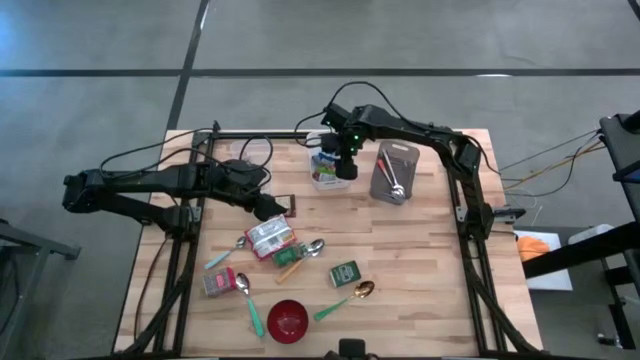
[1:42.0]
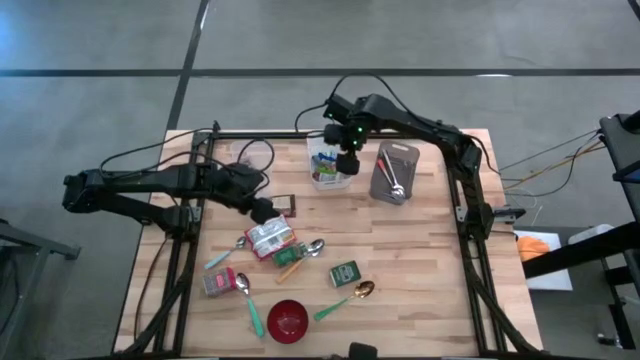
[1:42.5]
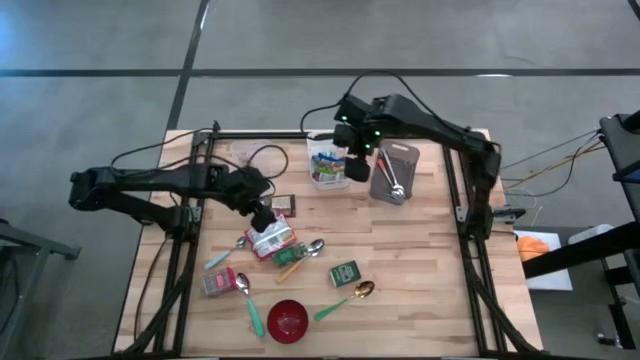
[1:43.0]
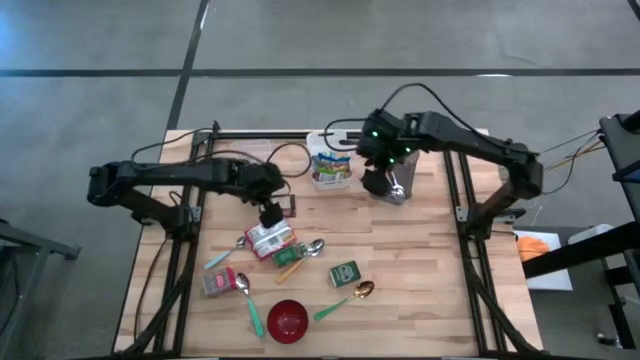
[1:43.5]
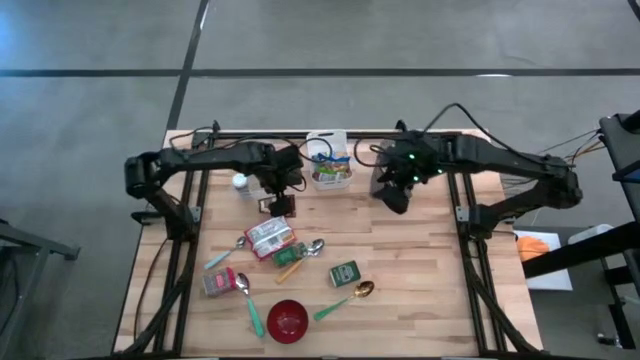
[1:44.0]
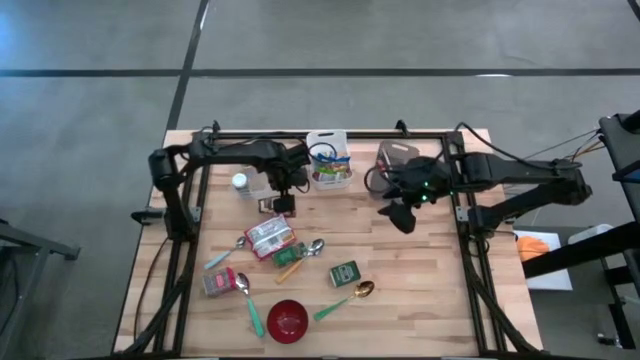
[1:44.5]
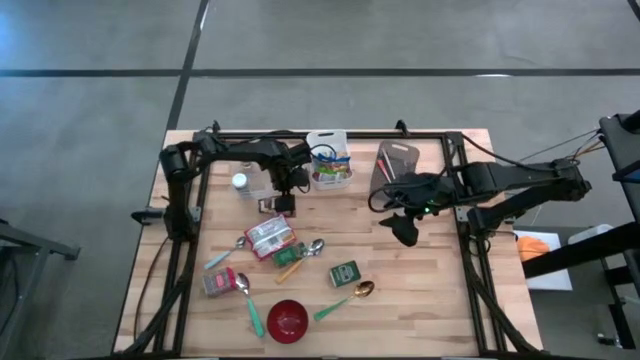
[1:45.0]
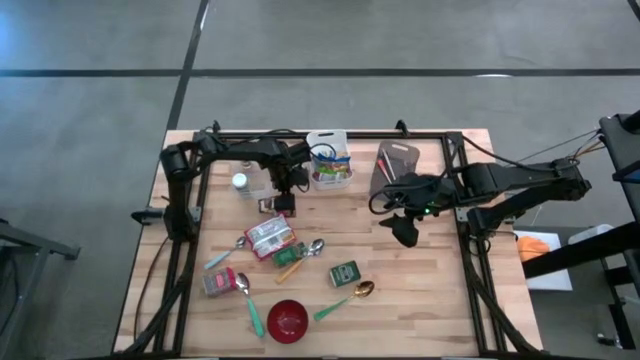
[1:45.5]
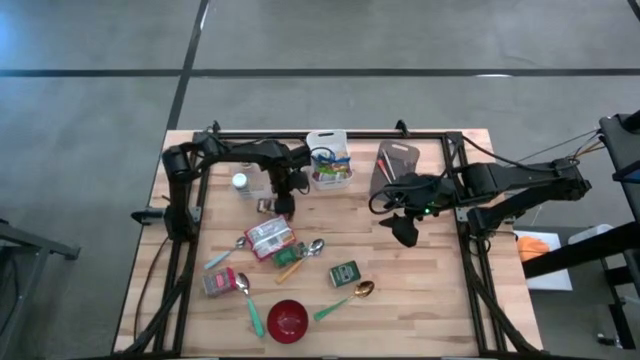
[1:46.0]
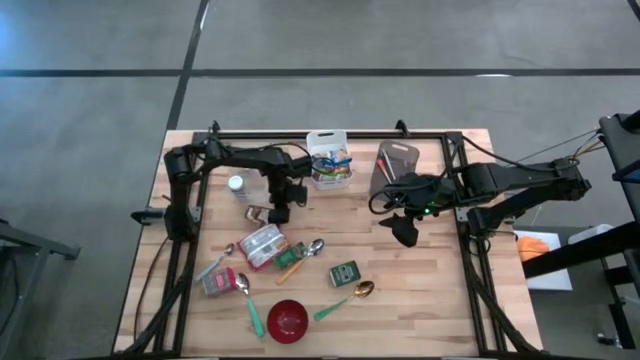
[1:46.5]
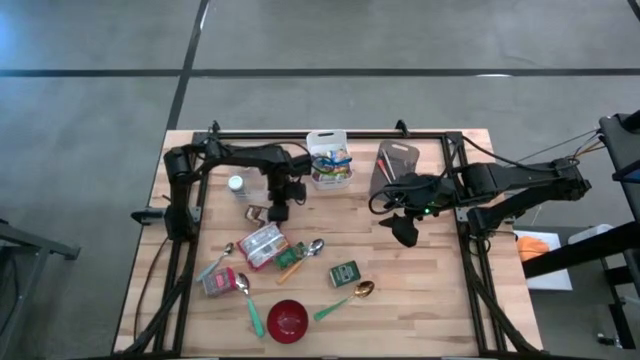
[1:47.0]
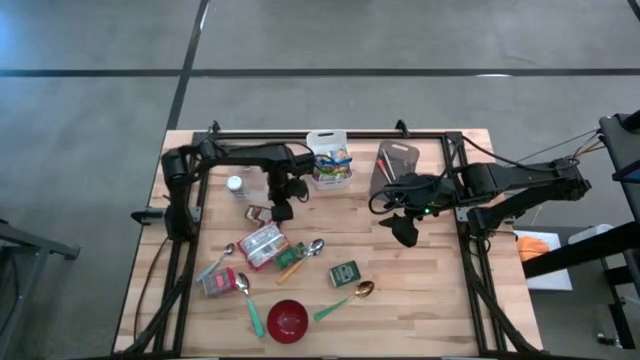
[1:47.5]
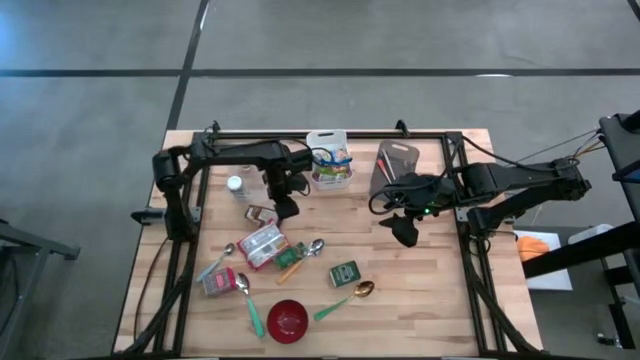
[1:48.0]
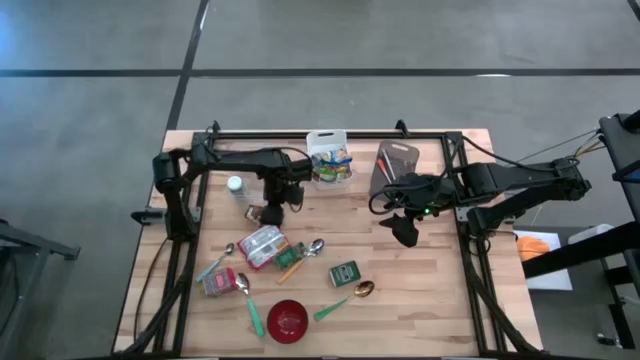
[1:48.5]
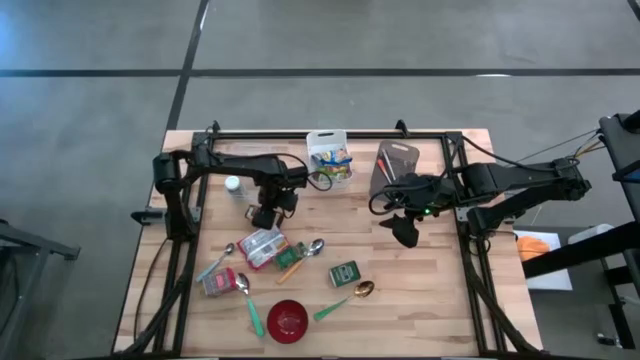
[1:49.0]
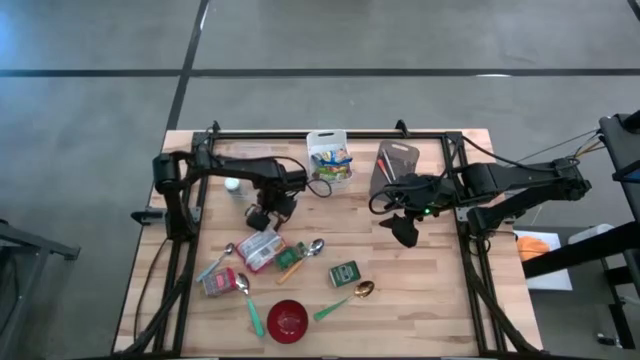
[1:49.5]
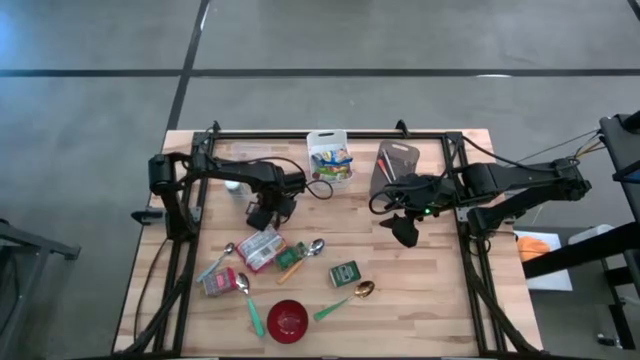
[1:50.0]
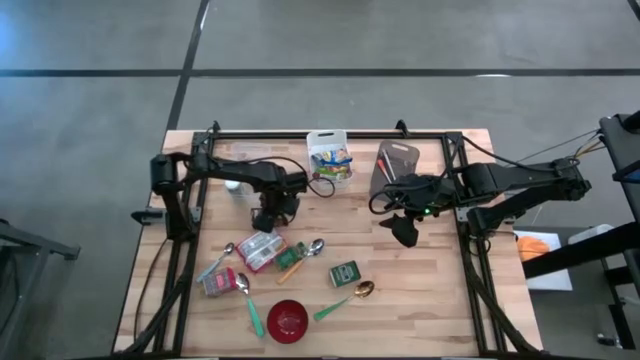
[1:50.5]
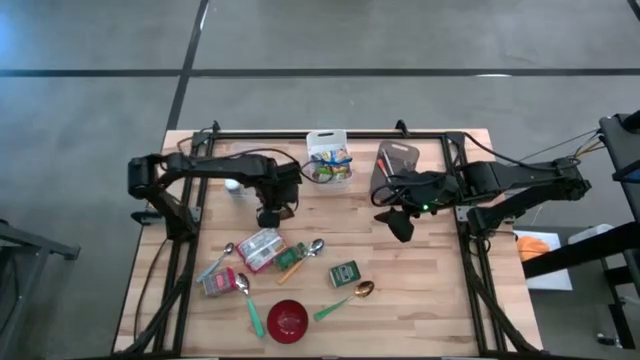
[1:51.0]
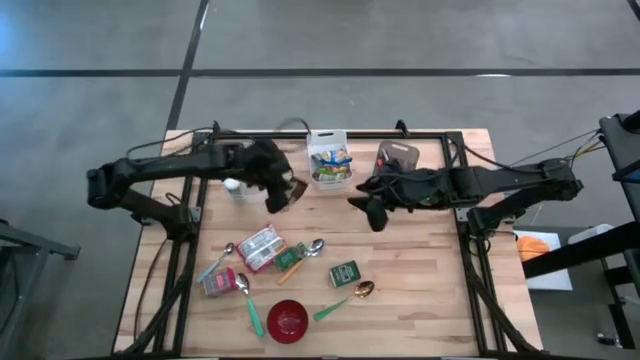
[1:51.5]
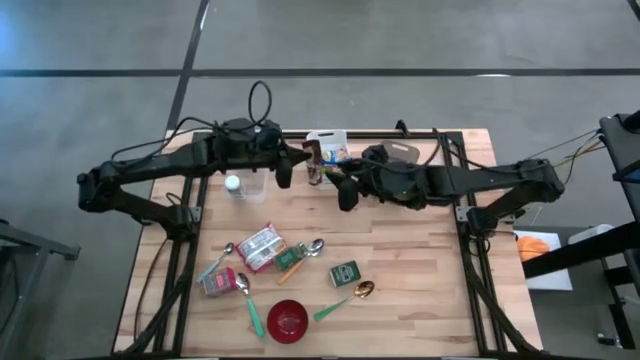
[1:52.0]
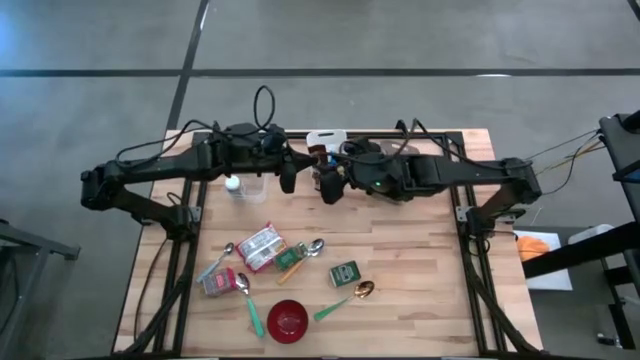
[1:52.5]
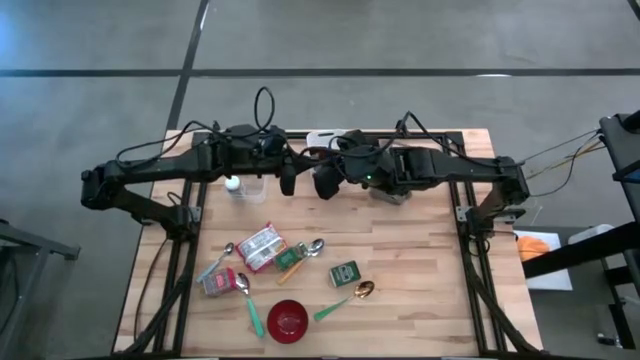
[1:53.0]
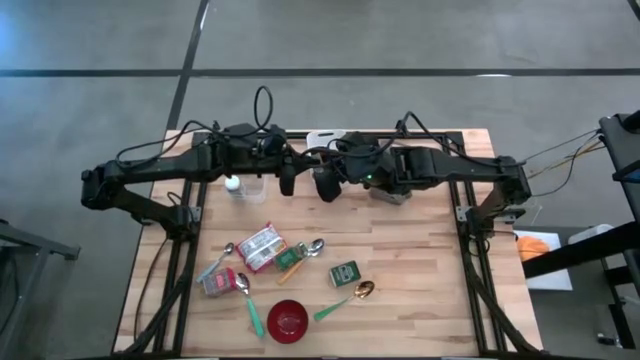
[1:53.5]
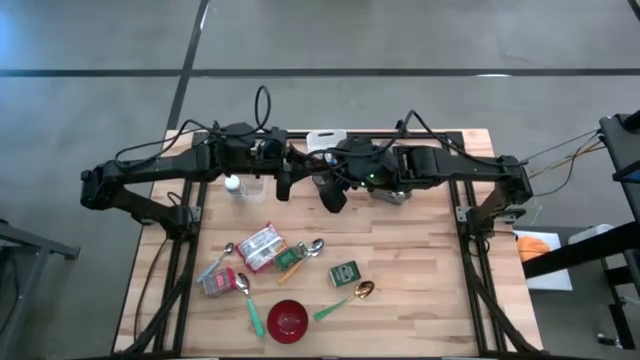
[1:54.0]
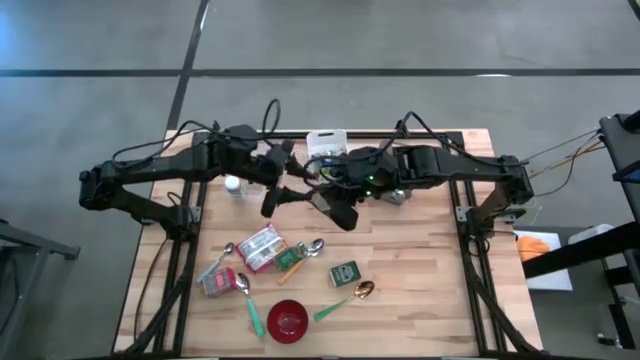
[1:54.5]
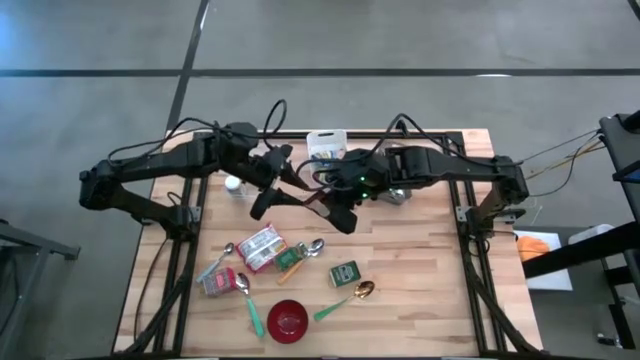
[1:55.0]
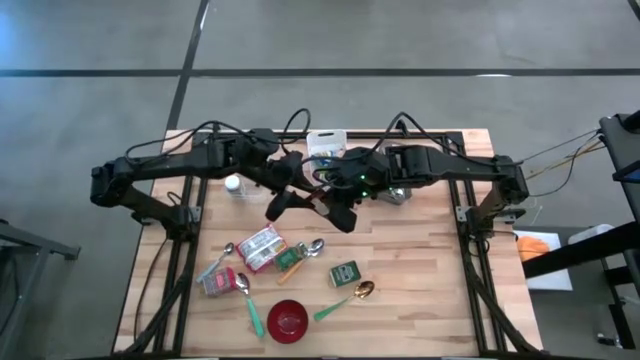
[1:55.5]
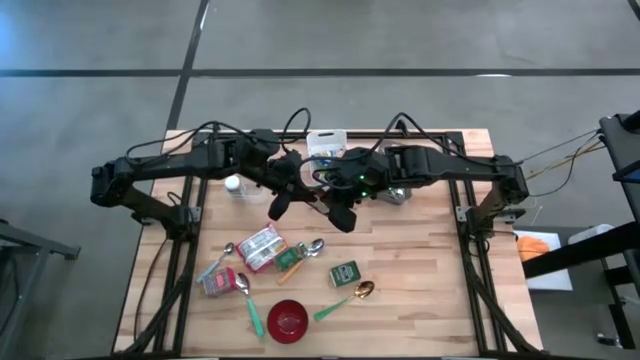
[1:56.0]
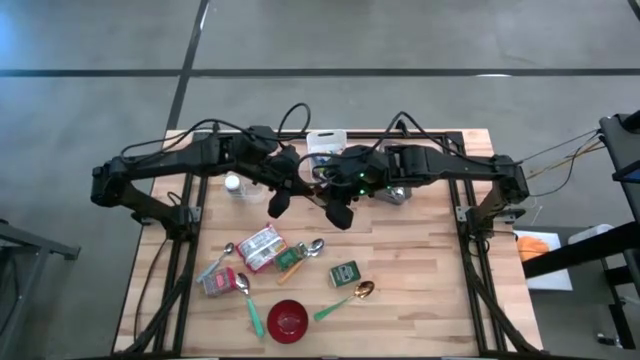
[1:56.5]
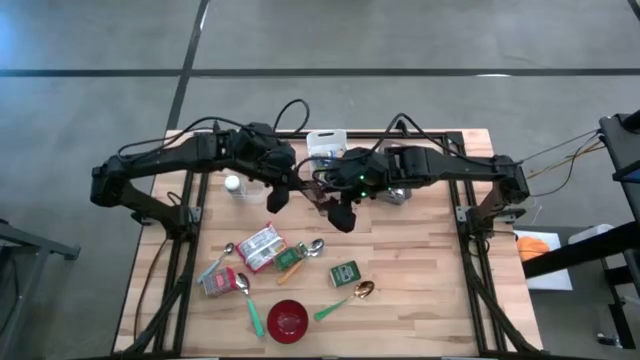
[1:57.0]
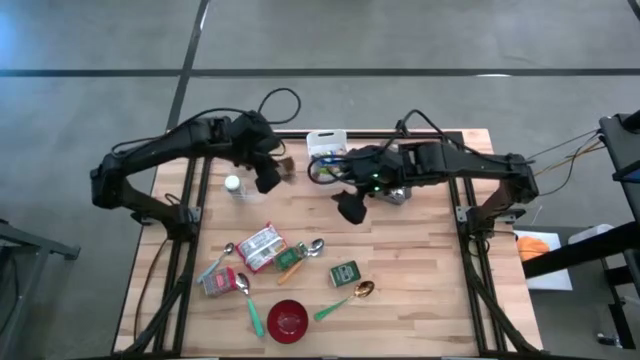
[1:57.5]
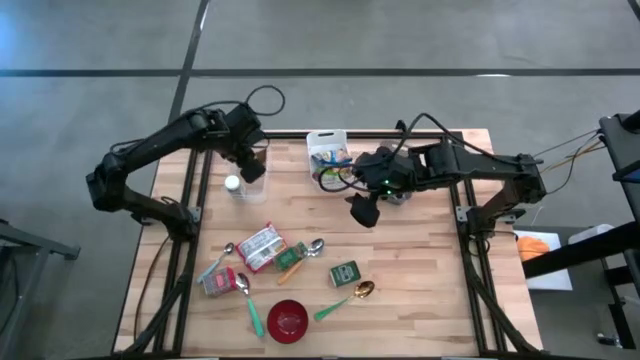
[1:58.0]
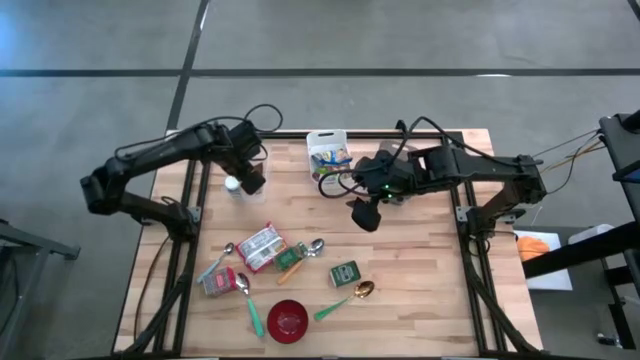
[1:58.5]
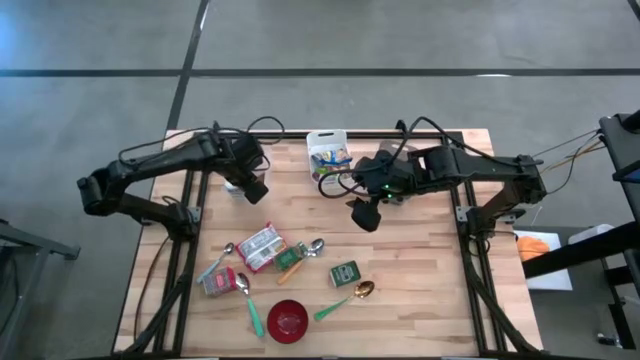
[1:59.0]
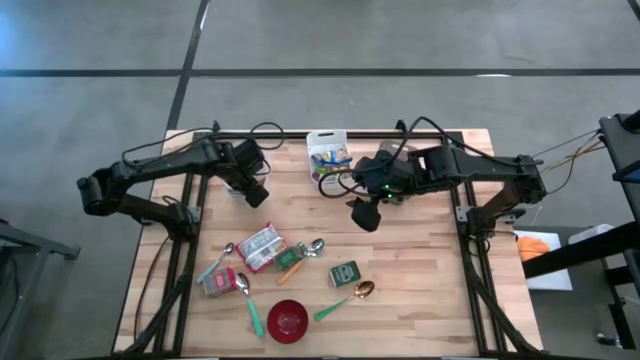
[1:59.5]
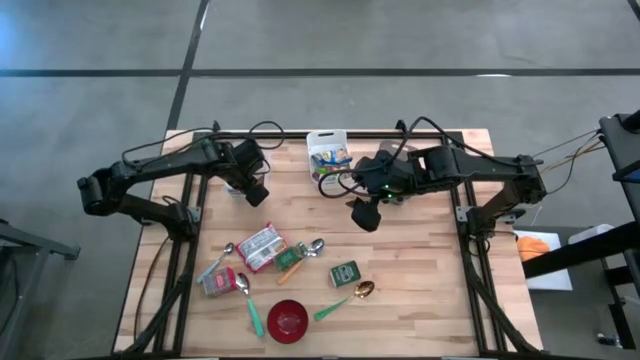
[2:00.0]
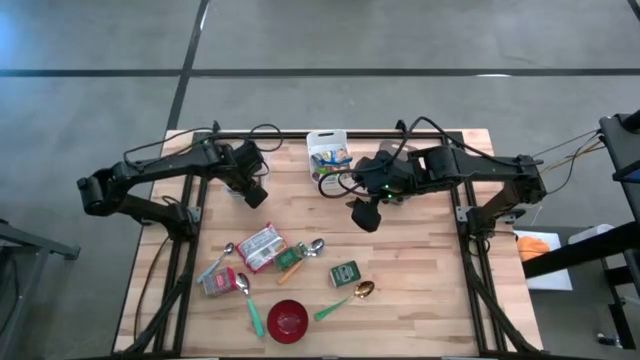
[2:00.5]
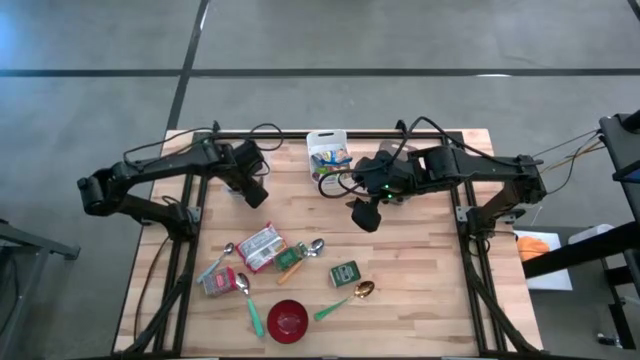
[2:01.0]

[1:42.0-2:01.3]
Put the brown seasoning pack into the transparent bin
